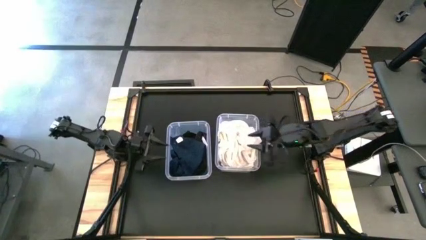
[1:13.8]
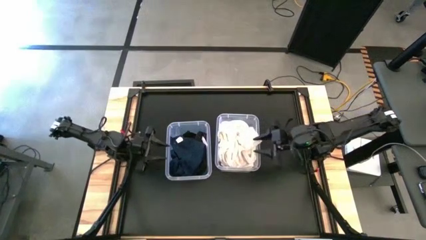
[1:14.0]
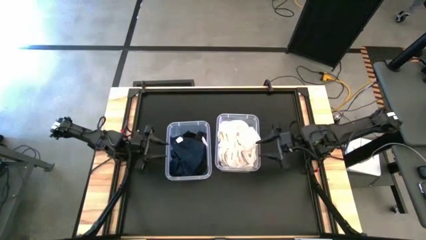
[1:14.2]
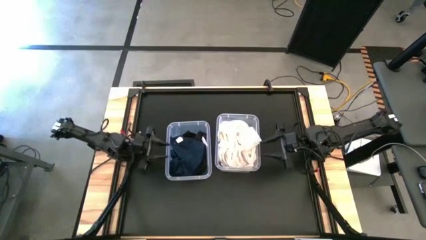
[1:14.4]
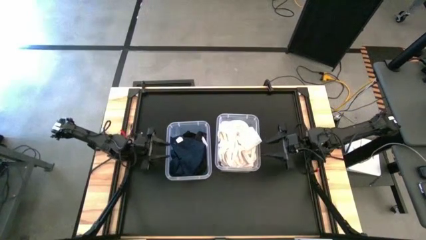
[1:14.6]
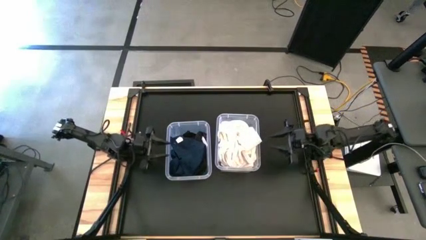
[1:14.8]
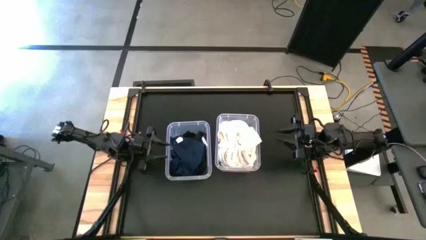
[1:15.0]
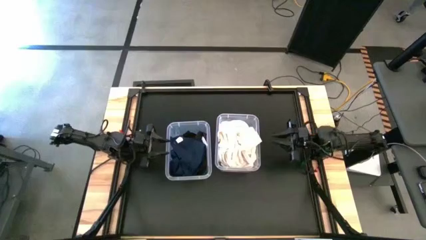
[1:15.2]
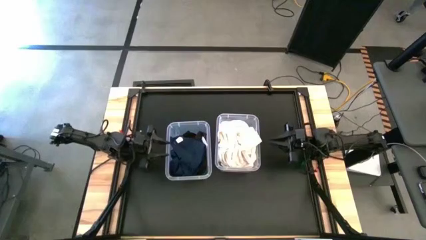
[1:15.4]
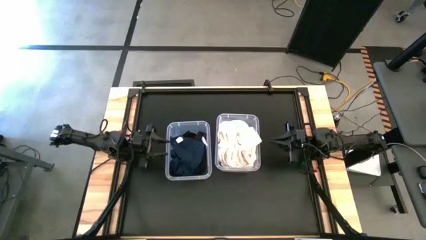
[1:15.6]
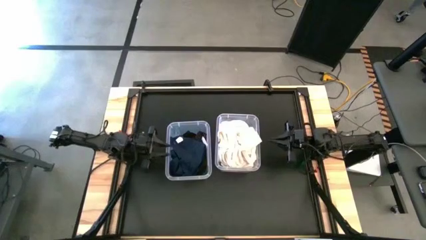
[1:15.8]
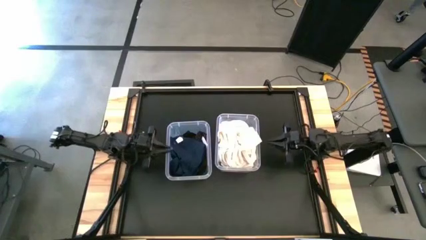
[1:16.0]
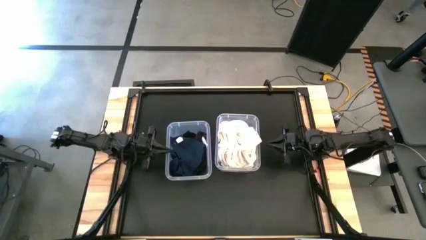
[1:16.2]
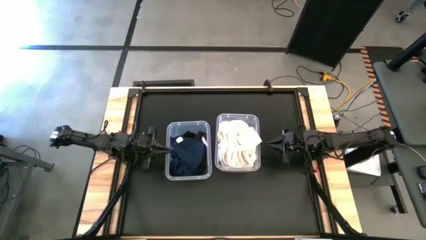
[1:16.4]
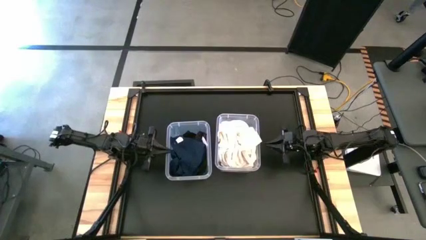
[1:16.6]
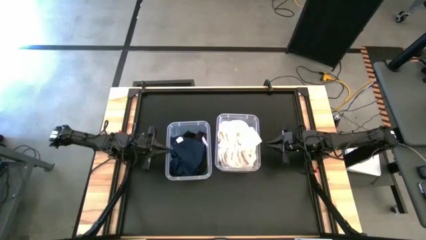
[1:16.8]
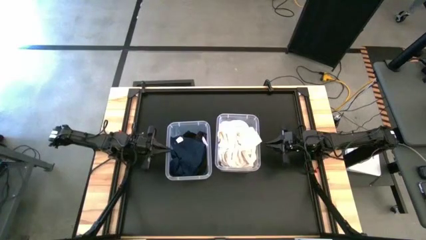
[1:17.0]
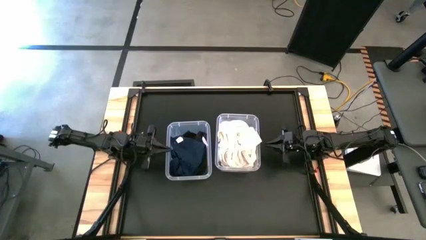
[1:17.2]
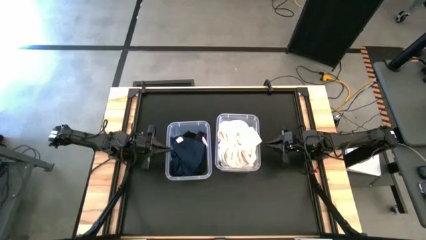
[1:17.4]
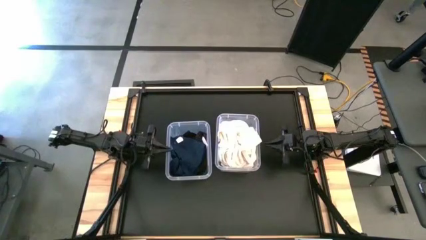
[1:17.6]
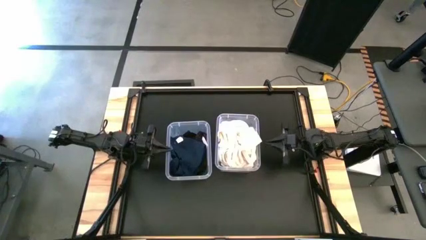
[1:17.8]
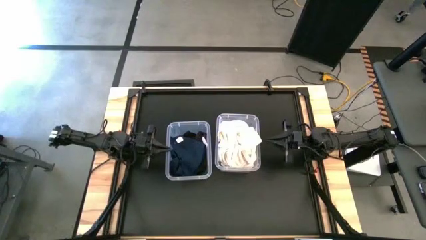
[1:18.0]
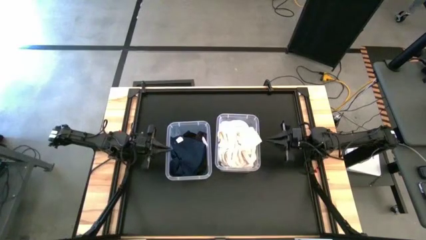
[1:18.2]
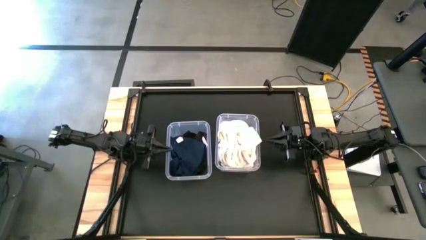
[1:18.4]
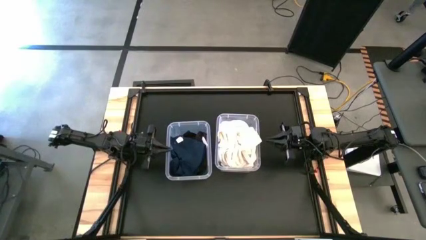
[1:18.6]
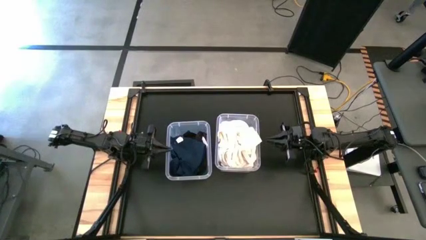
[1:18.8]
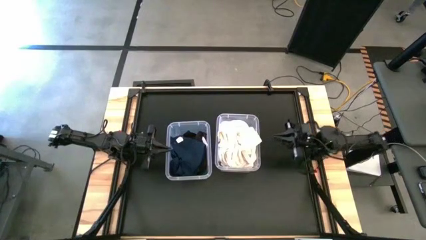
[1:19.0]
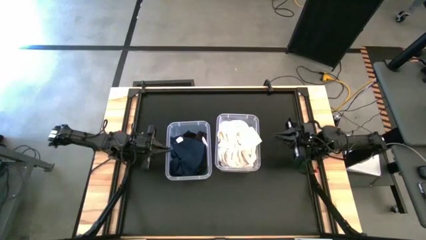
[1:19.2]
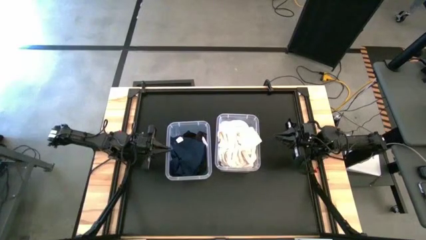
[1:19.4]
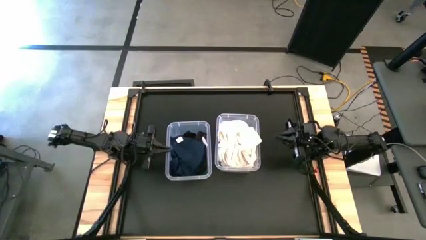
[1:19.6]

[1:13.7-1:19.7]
Task: Sort towels by color in basket
Return to Home Position
